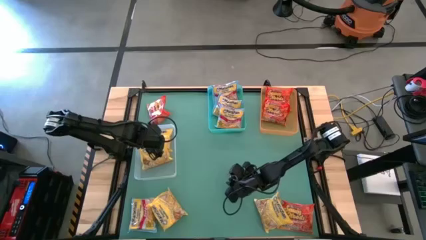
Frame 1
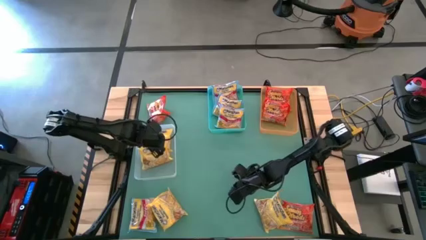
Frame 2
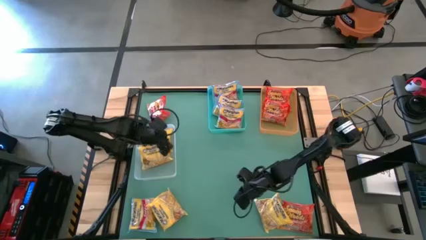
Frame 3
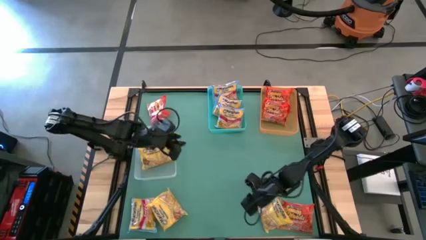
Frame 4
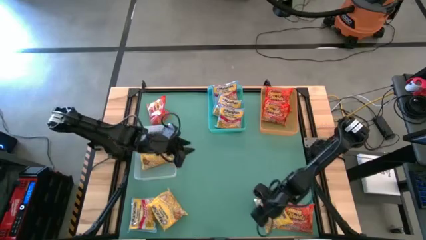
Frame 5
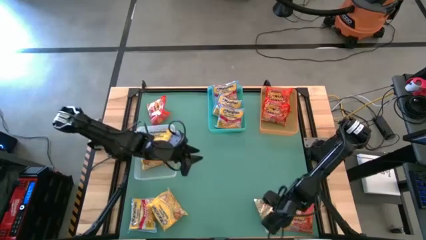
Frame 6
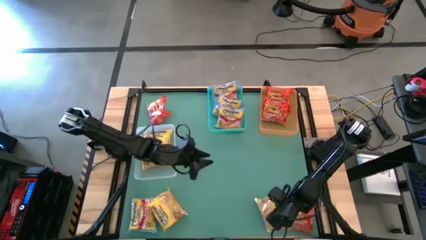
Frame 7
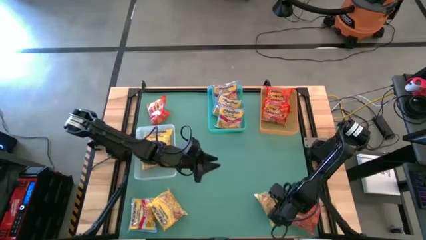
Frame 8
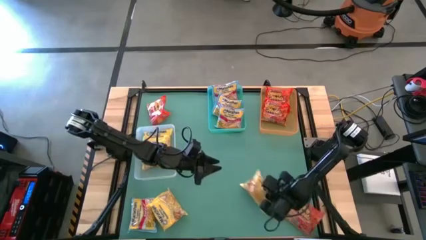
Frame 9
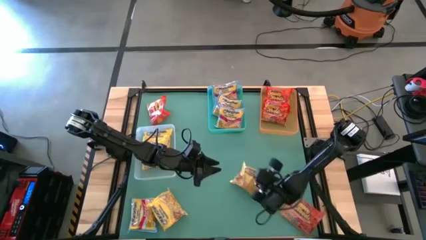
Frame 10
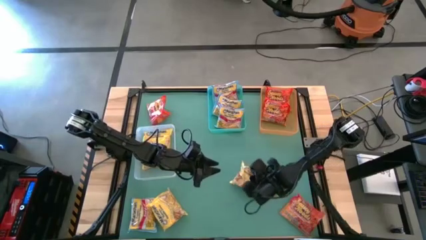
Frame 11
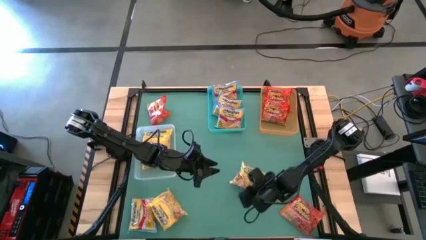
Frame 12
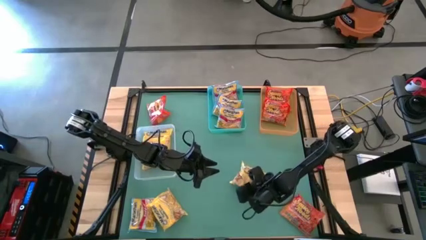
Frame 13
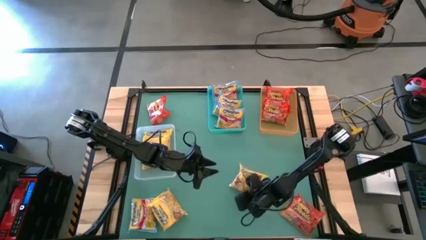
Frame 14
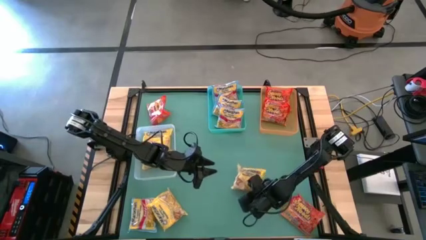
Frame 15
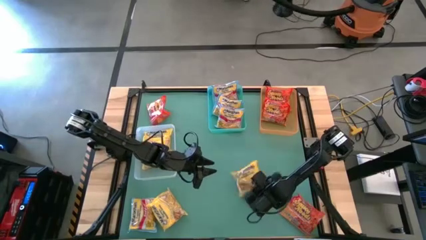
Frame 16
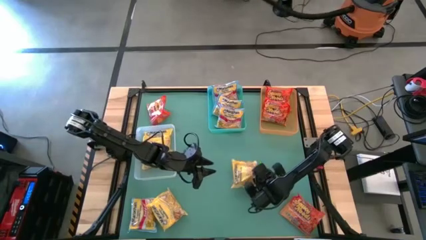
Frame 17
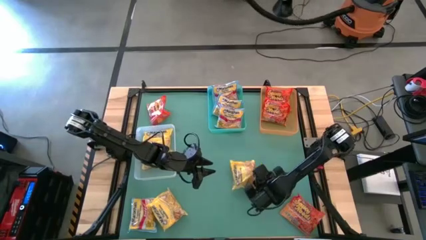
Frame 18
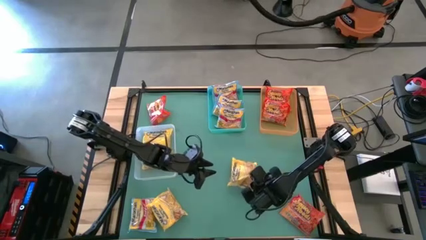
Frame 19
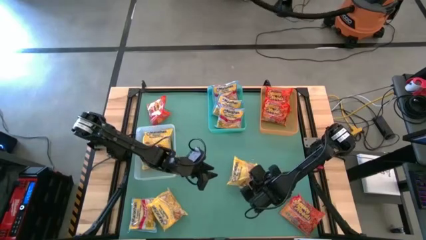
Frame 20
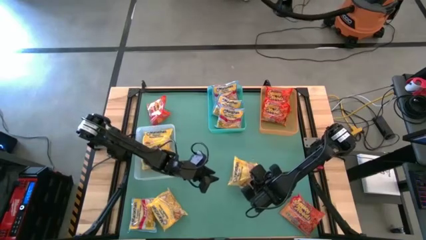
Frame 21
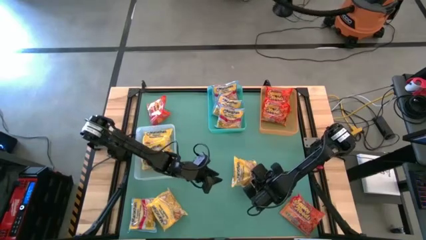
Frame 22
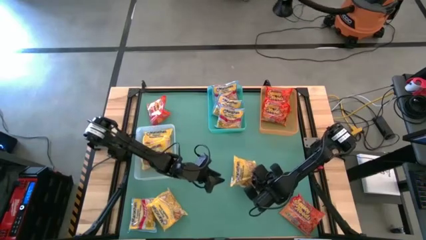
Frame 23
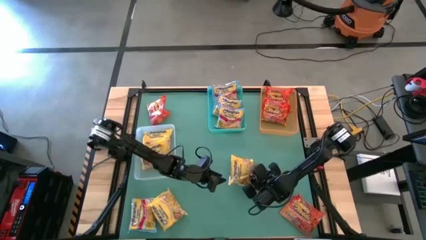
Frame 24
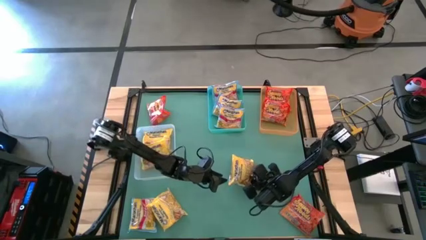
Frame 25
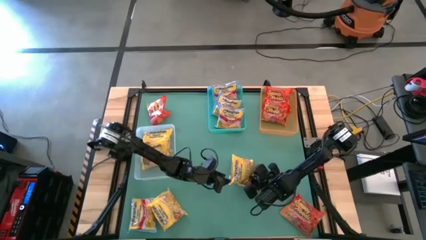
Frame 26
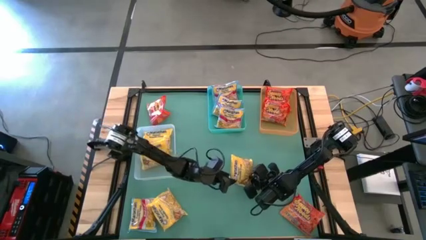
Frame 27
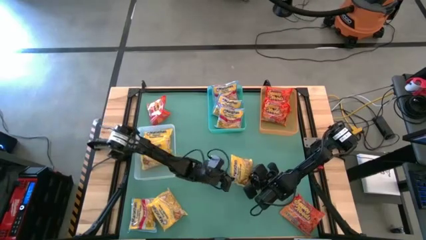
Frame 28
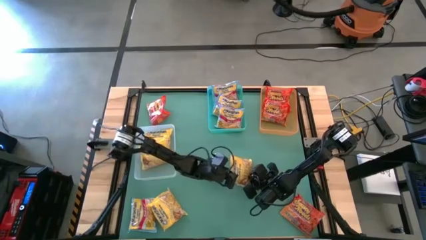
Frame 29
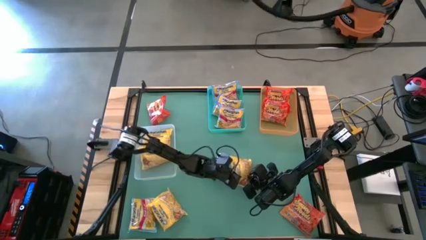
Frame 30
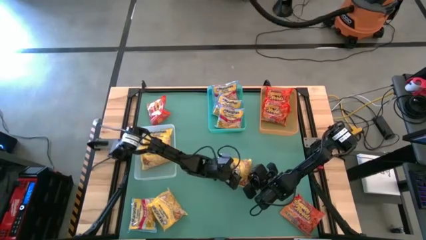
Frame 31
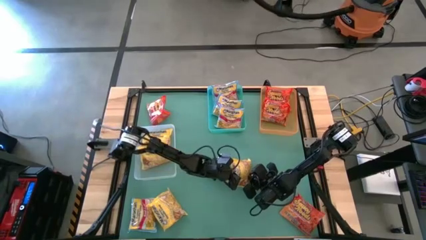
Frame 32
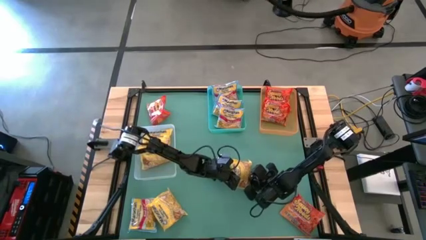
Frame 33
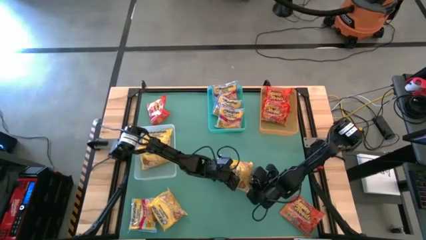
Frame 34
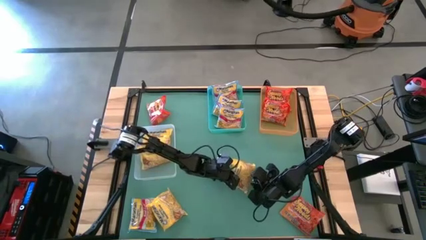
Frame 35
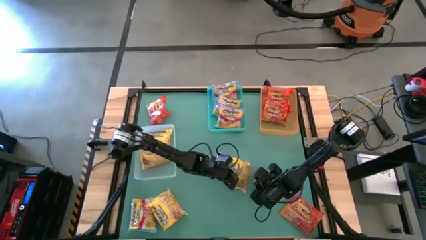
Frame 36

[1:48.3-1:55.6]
Task: Sort Maruchan noodles
Put the right yellow noodle pack into the transparent bin

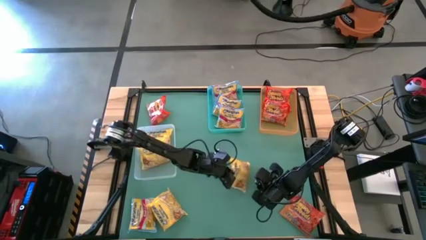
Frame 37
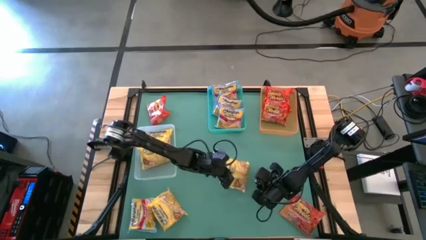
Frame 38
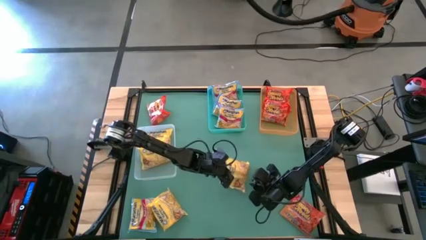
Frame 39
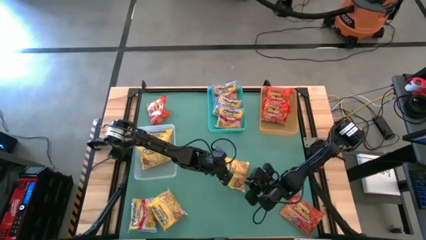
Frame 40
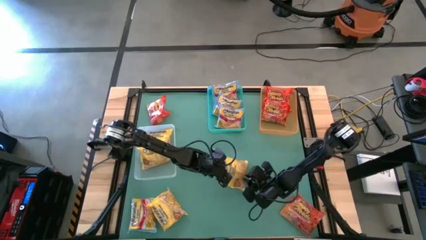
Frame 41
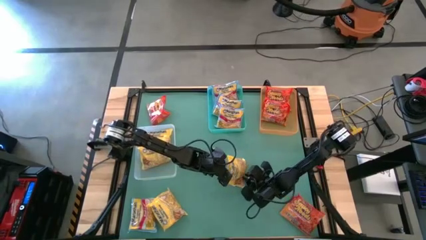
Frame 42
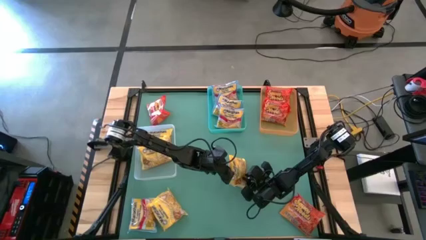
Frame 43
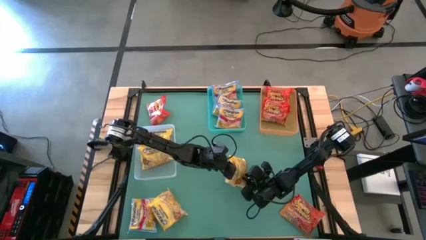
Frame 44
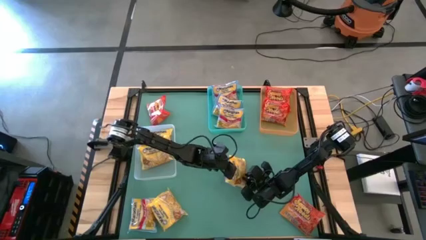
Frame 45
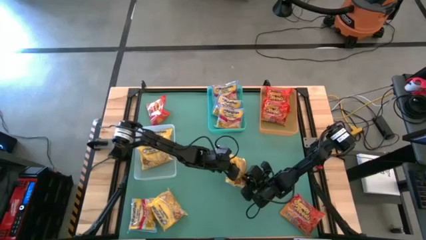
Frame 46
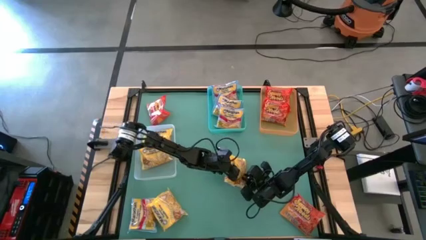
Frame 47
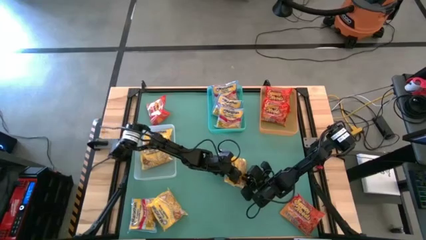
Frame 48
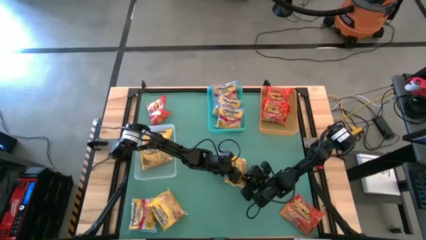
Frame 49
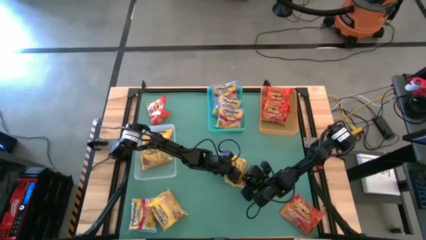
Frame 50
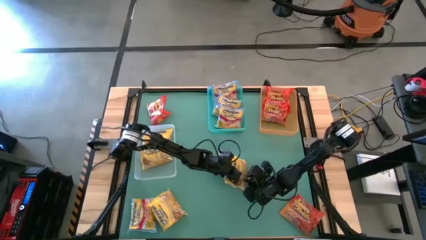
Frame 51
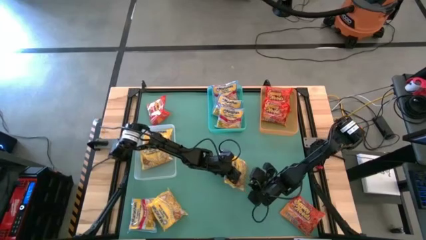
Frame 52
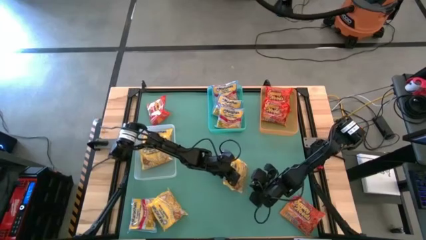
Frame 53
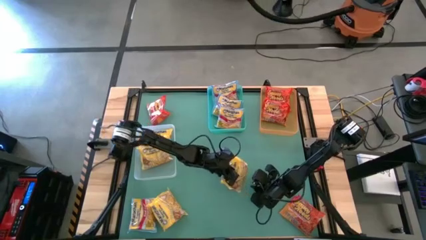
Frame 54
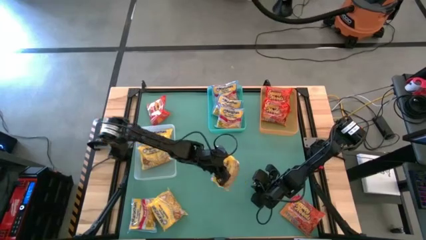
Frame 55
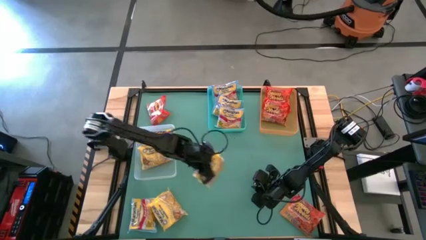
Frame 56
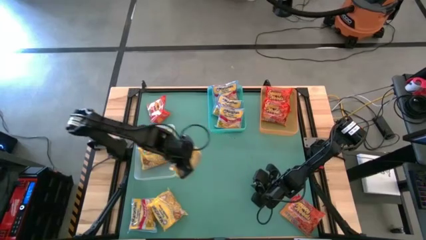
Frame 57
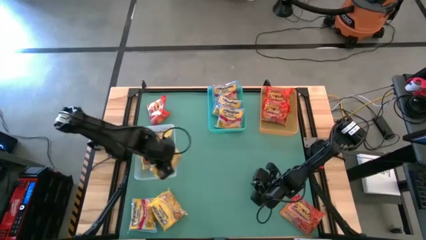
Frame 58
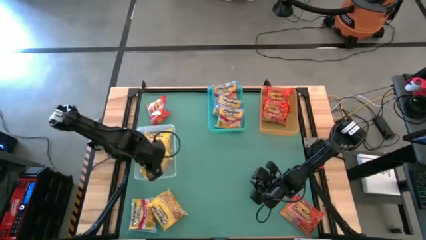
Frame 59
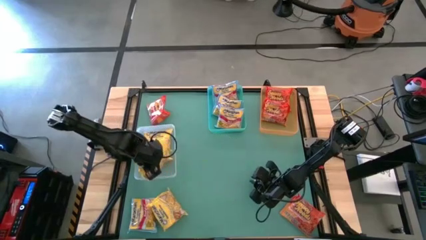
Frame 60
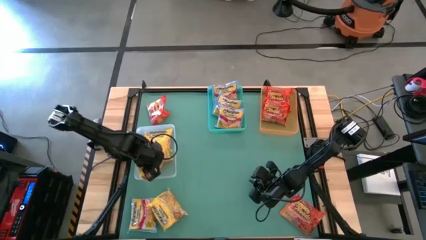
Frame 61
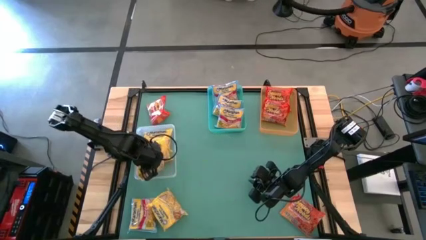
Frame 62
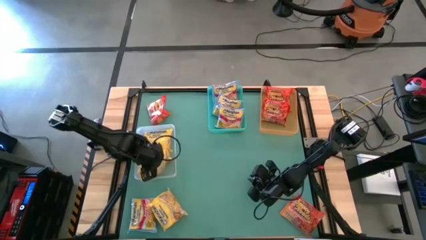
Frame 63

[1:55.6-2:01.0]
Put the right yellow noodle pack into the transparent bin

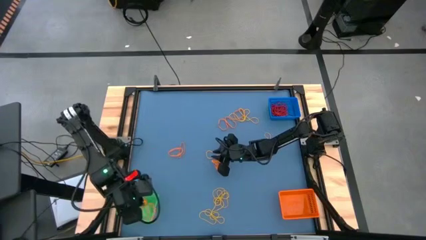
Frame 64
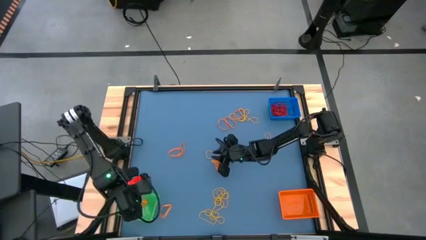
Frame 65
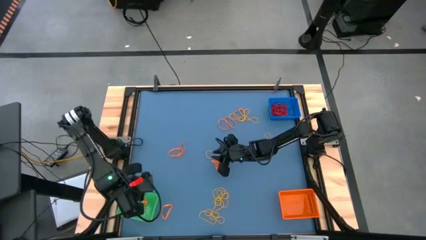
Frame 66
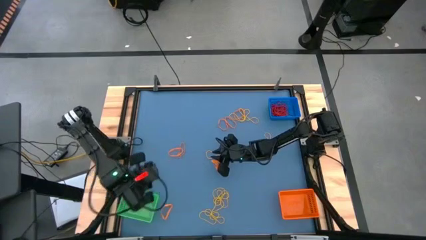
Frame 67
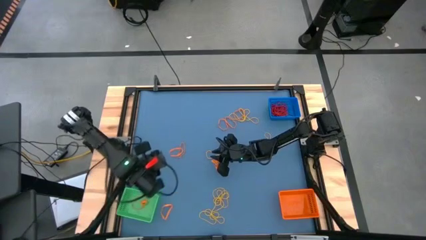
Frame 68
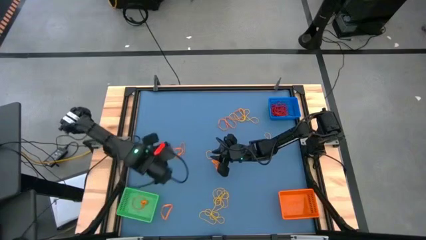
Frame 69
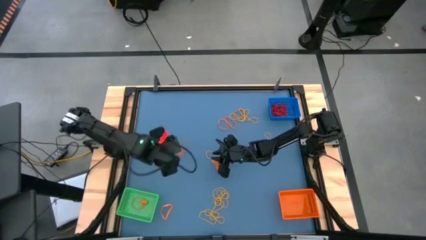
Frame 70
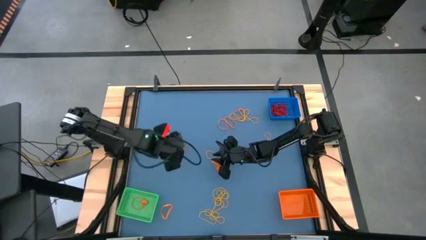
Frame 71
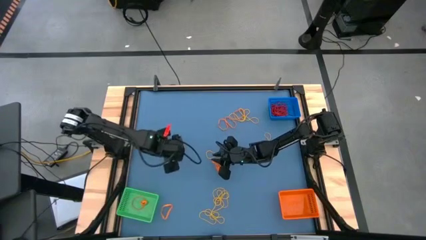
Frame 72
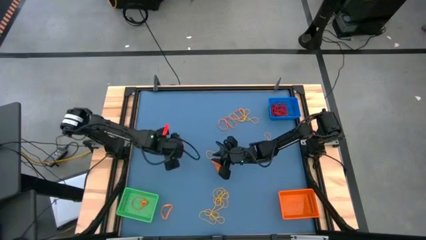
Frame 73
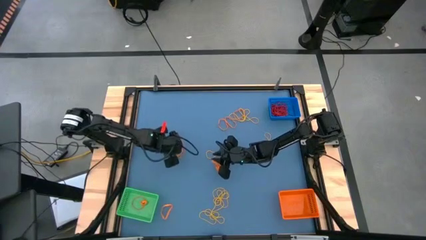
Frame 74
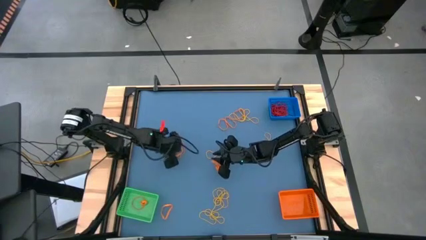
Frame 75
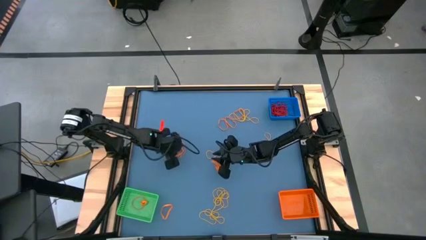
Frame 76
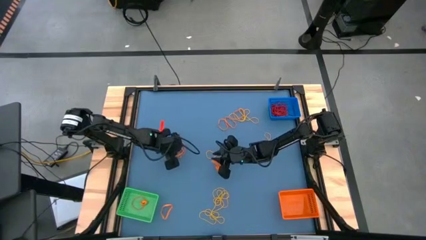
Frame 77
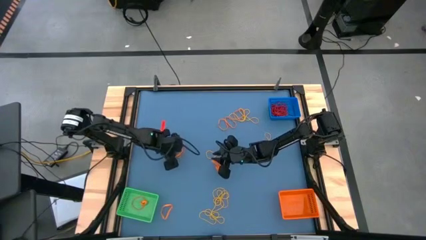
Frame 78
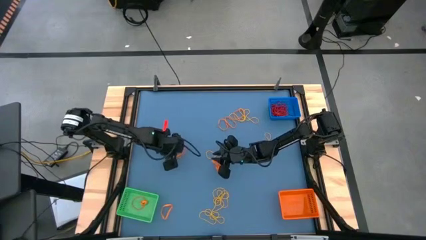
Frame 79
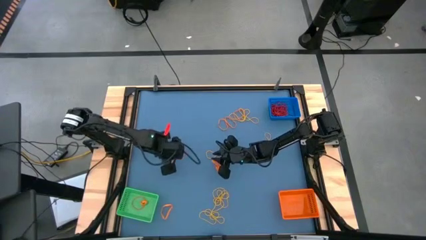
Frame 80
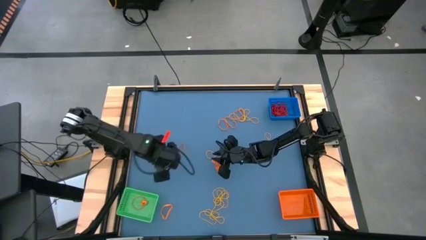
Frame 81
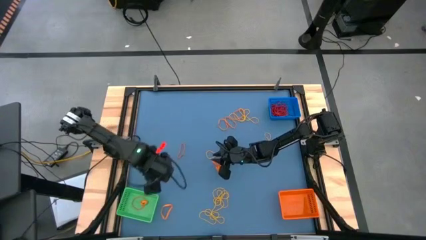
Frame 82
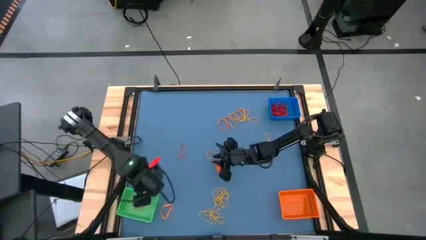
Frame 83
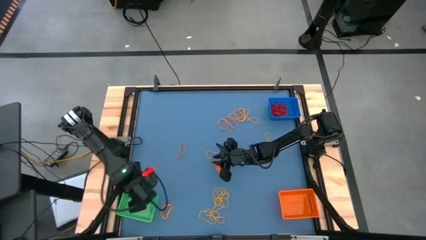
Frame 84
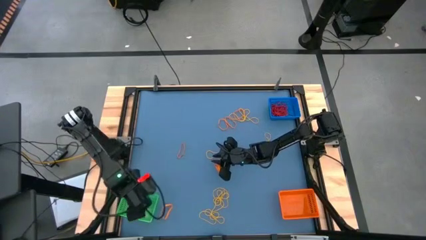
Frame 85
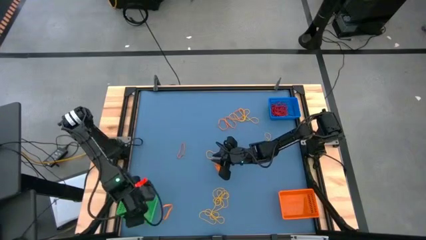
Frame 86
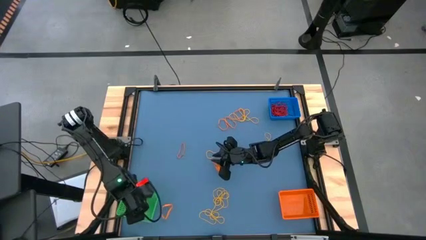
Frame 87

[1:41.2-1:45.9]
Task: Sort rubber bands into baskets
Put the orange rubber band into the green bin
